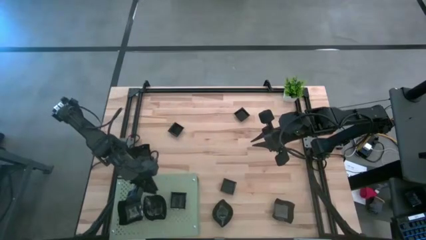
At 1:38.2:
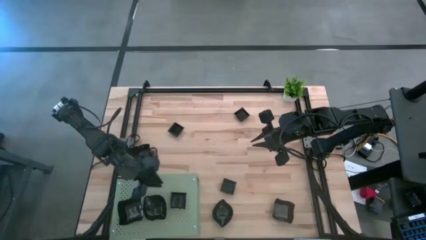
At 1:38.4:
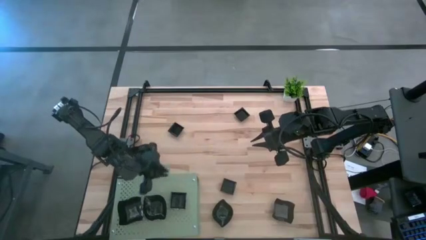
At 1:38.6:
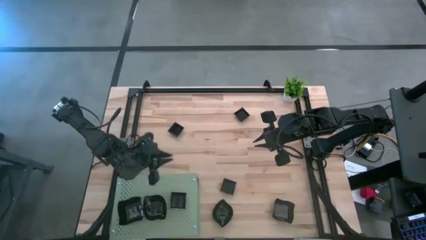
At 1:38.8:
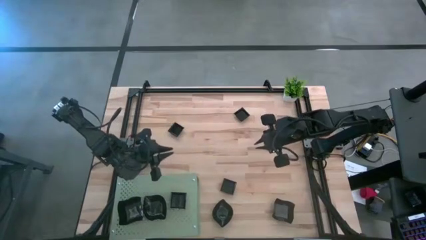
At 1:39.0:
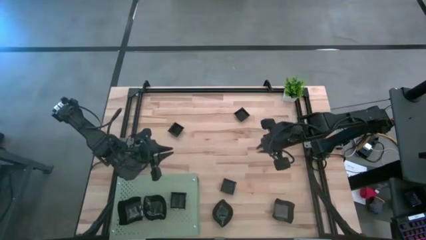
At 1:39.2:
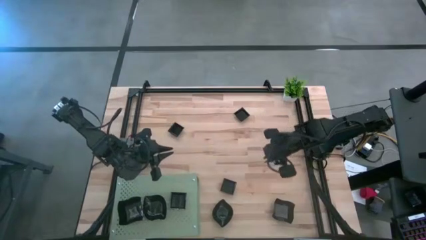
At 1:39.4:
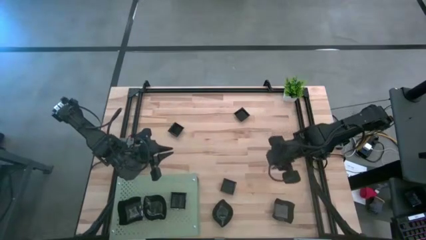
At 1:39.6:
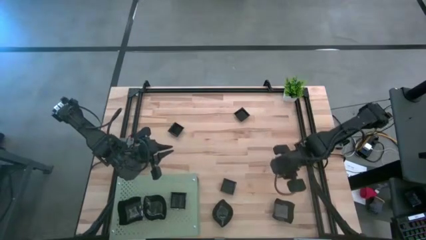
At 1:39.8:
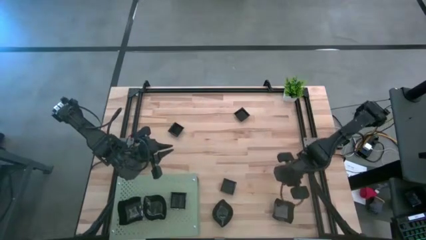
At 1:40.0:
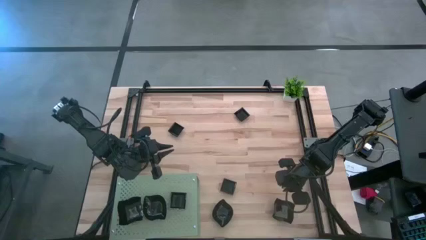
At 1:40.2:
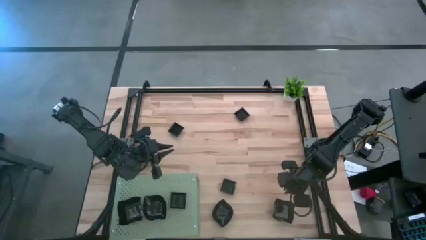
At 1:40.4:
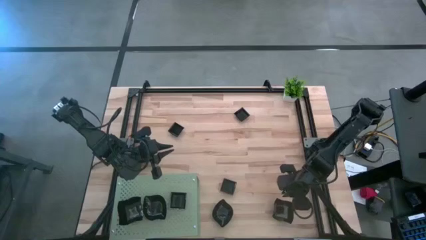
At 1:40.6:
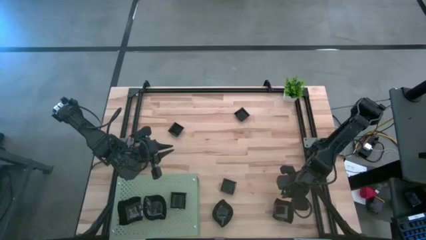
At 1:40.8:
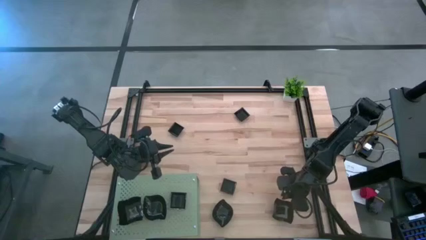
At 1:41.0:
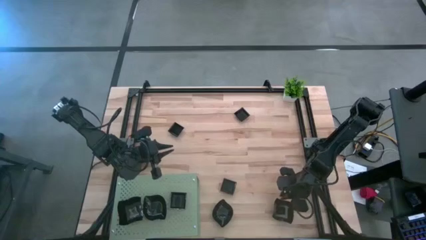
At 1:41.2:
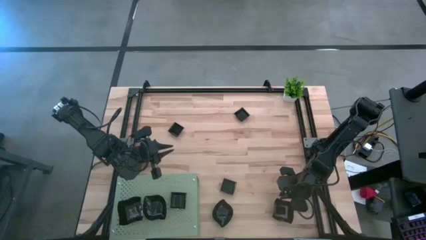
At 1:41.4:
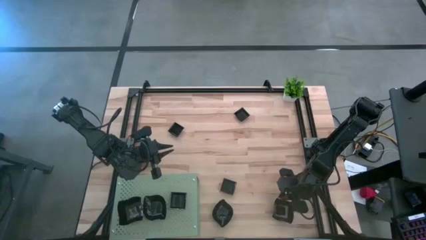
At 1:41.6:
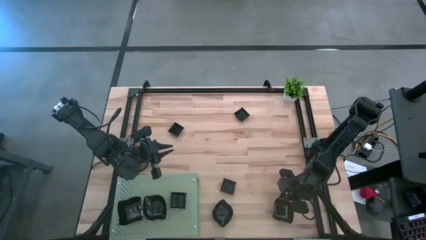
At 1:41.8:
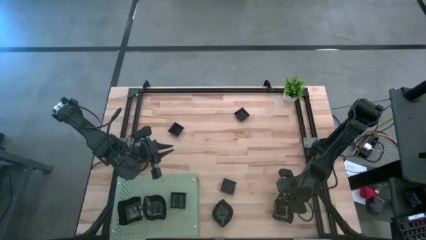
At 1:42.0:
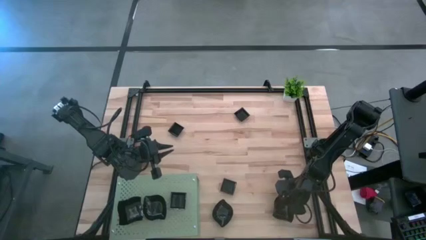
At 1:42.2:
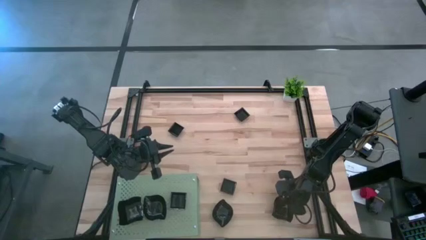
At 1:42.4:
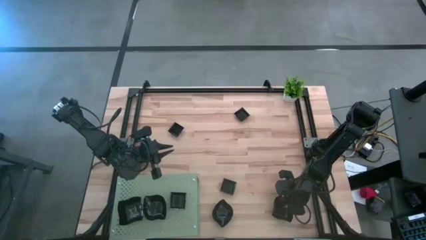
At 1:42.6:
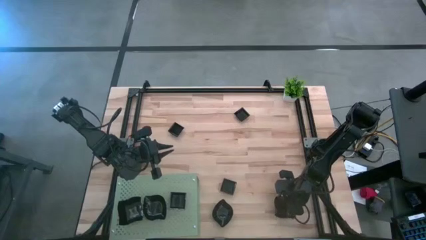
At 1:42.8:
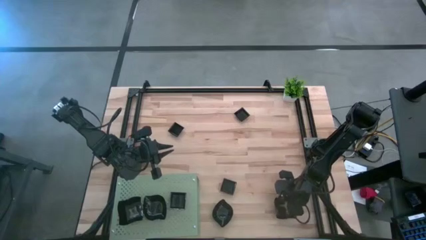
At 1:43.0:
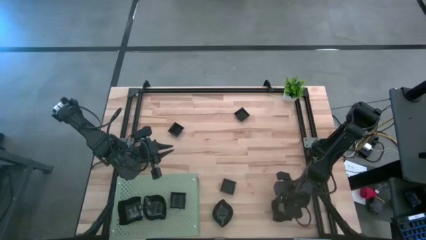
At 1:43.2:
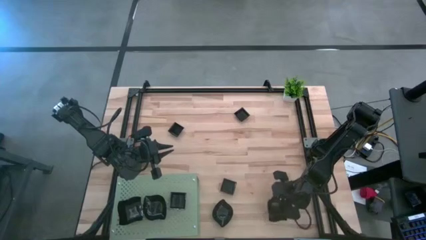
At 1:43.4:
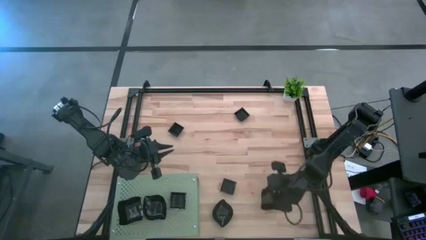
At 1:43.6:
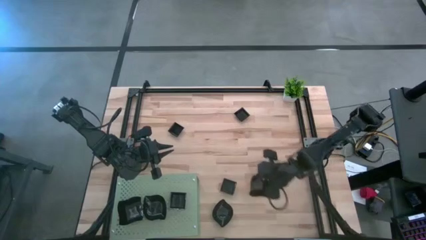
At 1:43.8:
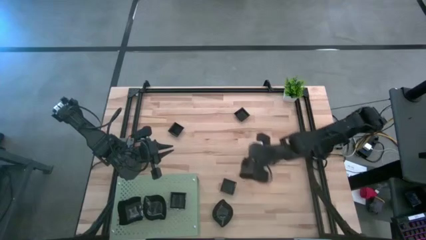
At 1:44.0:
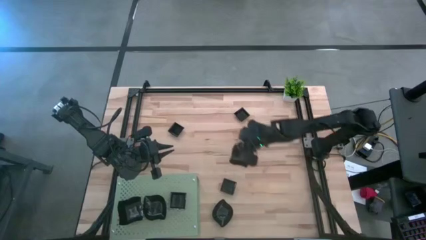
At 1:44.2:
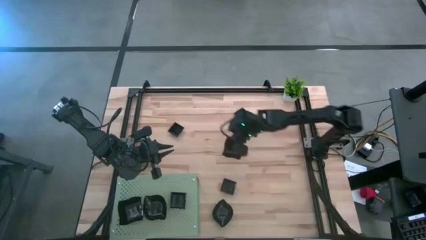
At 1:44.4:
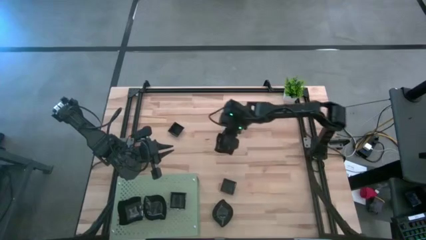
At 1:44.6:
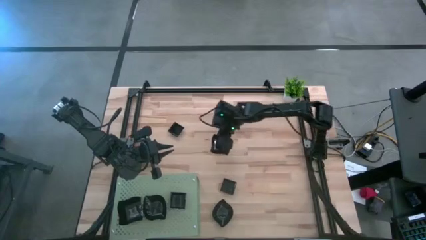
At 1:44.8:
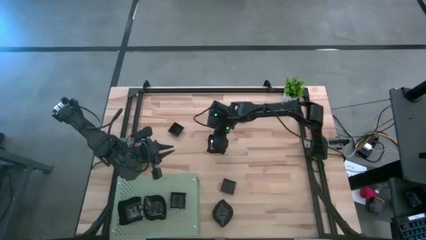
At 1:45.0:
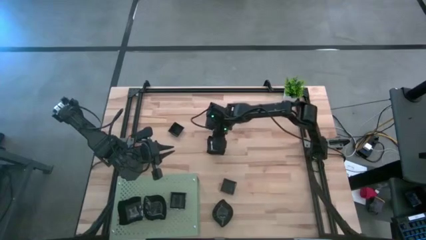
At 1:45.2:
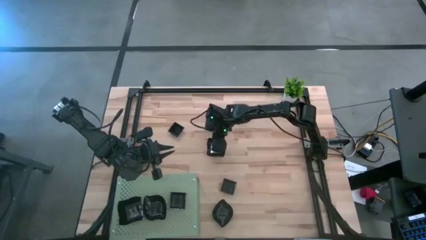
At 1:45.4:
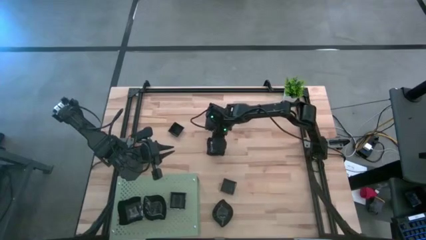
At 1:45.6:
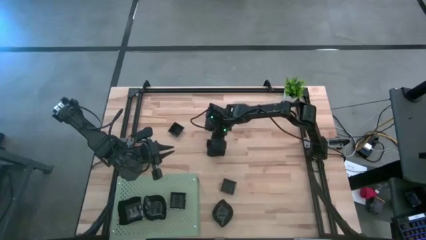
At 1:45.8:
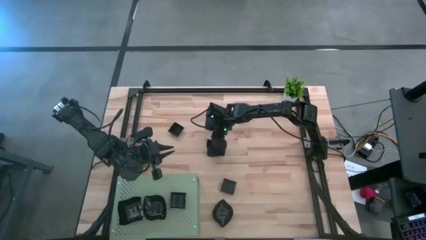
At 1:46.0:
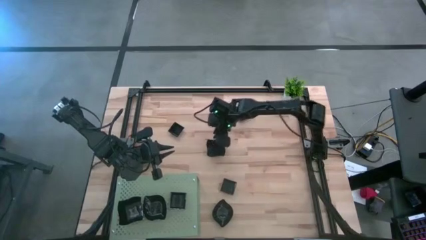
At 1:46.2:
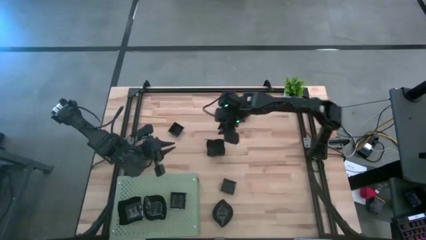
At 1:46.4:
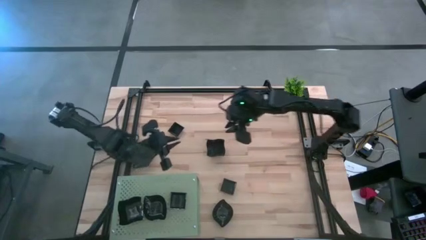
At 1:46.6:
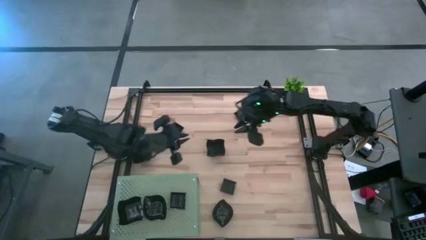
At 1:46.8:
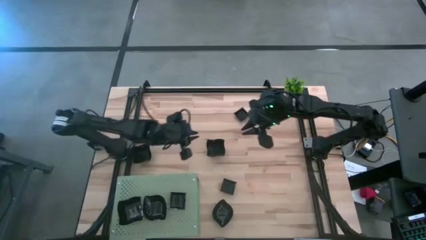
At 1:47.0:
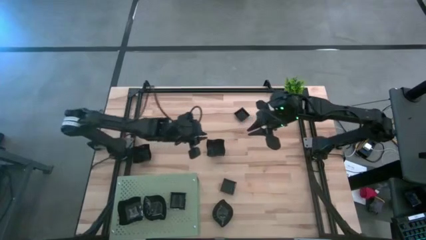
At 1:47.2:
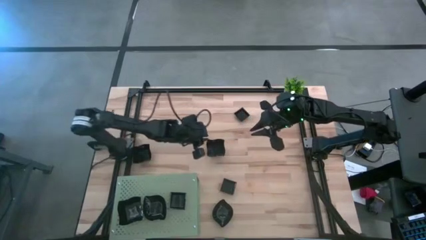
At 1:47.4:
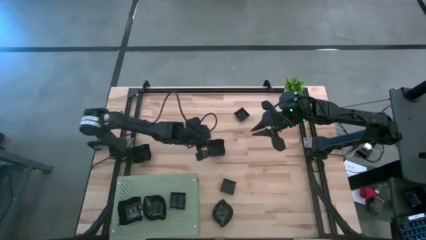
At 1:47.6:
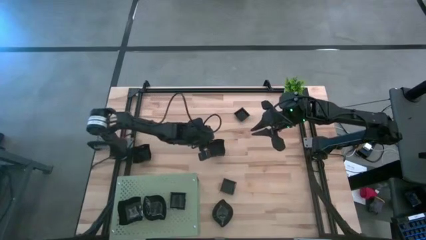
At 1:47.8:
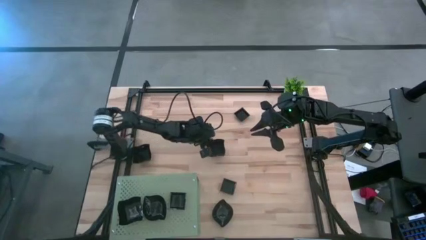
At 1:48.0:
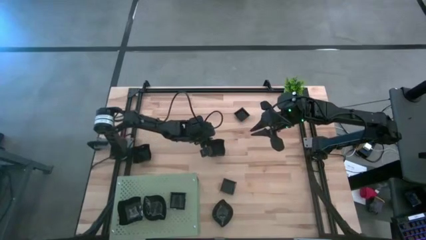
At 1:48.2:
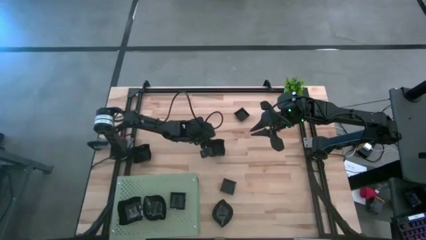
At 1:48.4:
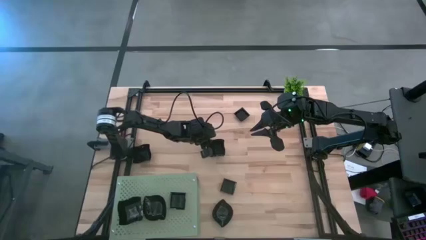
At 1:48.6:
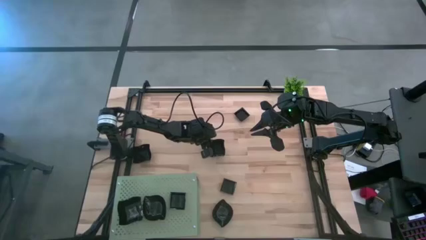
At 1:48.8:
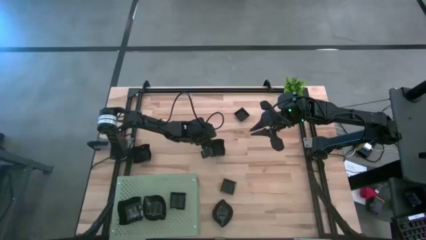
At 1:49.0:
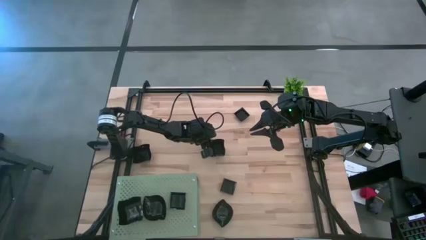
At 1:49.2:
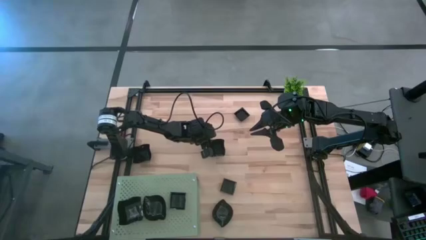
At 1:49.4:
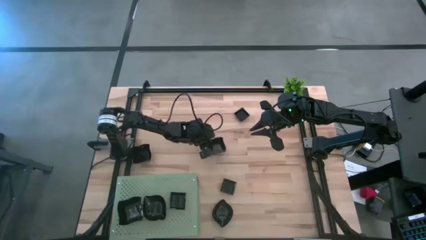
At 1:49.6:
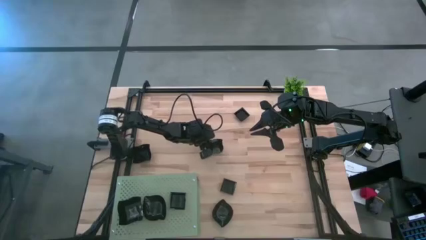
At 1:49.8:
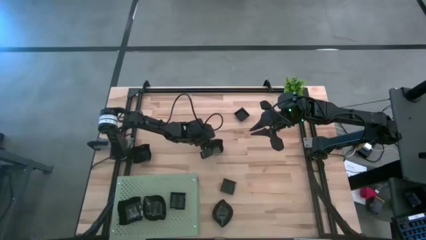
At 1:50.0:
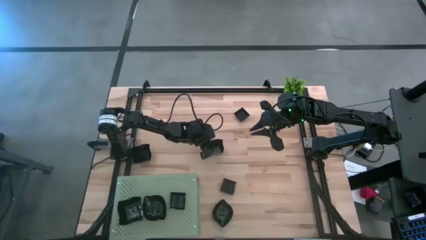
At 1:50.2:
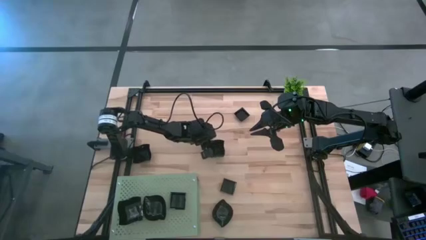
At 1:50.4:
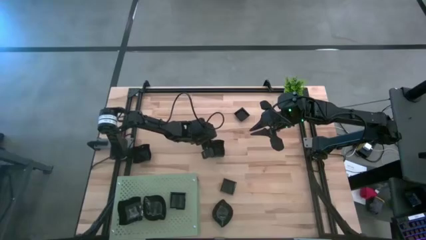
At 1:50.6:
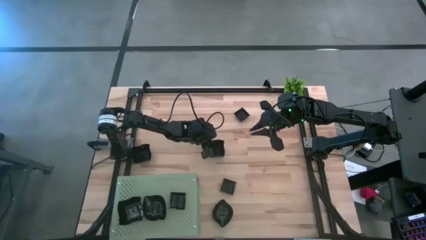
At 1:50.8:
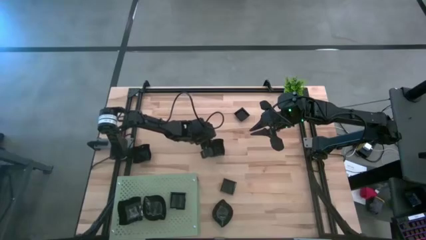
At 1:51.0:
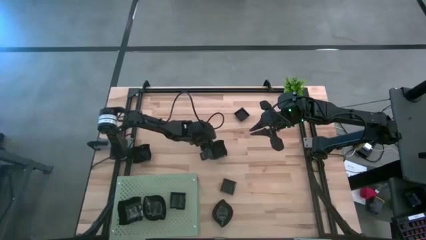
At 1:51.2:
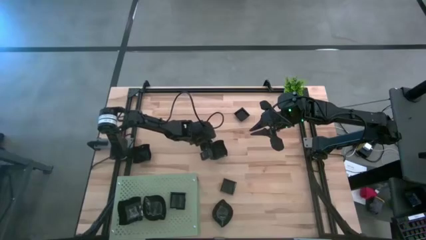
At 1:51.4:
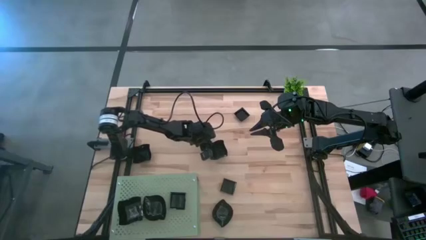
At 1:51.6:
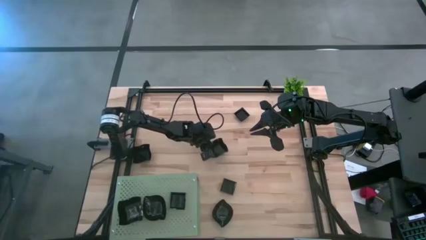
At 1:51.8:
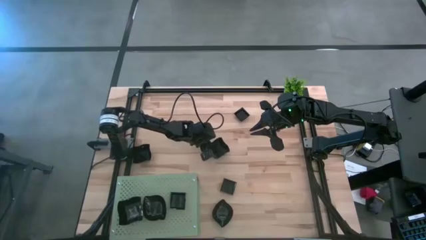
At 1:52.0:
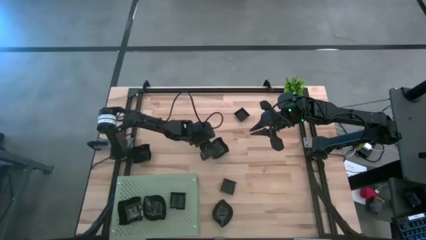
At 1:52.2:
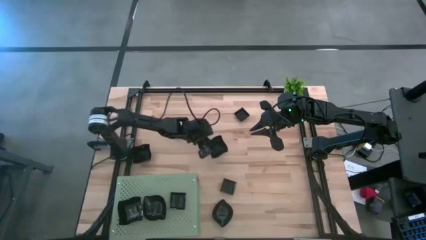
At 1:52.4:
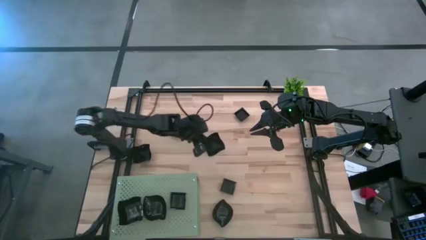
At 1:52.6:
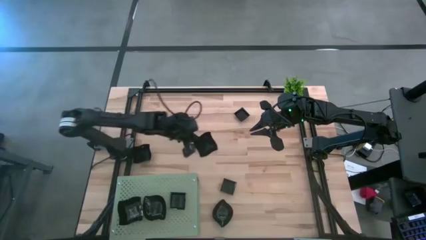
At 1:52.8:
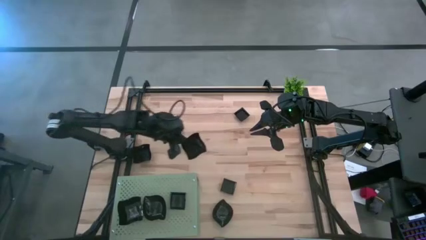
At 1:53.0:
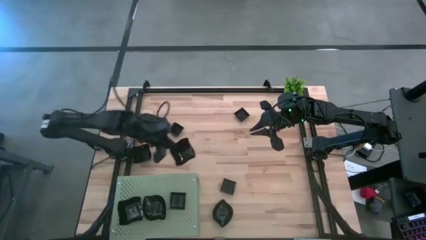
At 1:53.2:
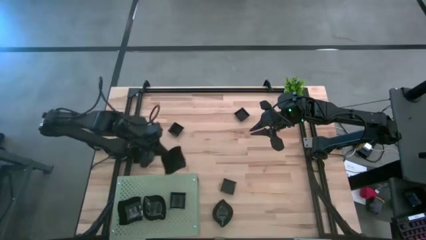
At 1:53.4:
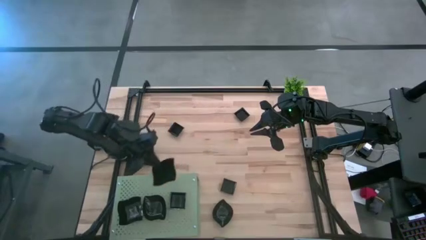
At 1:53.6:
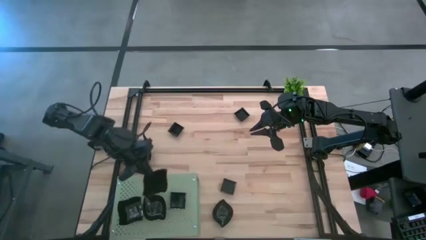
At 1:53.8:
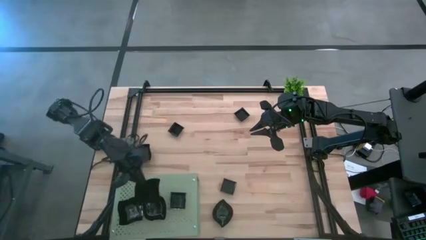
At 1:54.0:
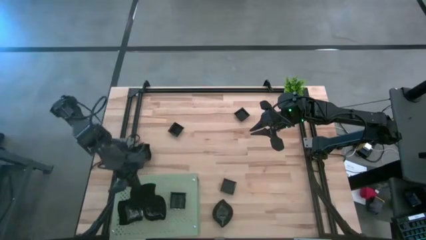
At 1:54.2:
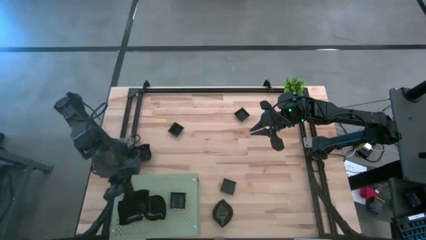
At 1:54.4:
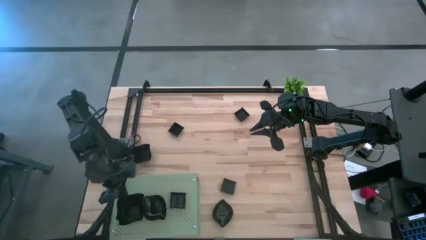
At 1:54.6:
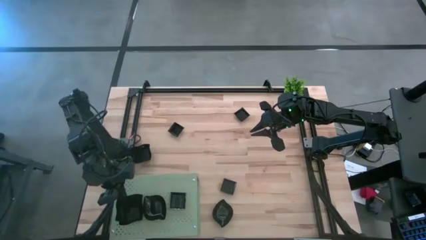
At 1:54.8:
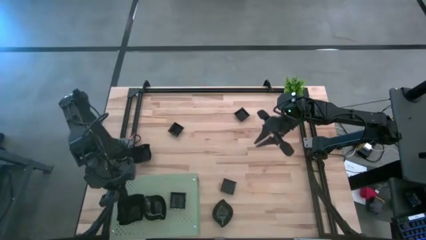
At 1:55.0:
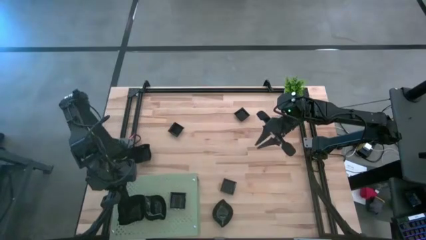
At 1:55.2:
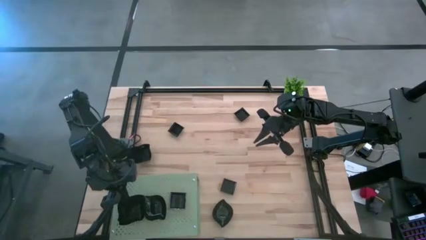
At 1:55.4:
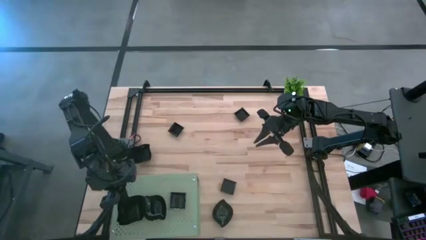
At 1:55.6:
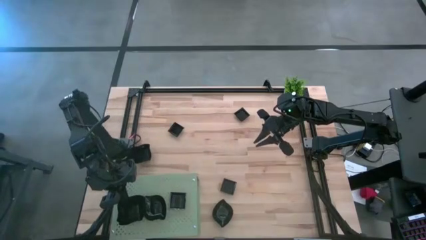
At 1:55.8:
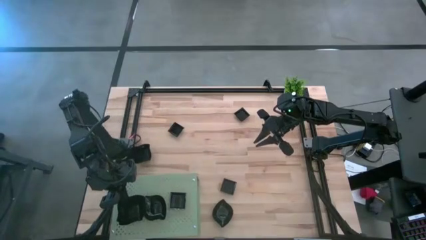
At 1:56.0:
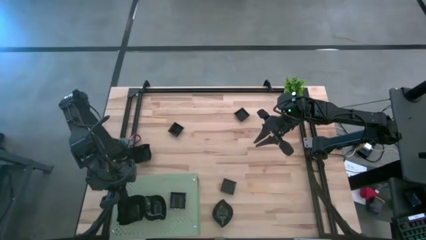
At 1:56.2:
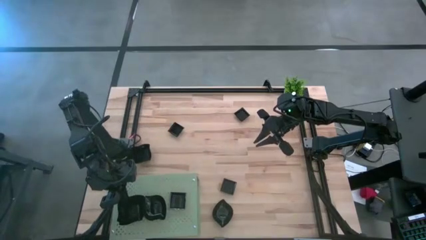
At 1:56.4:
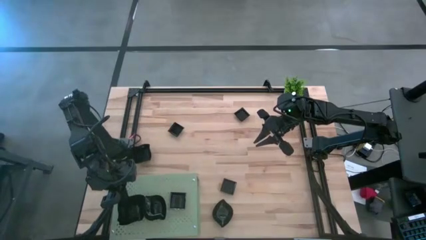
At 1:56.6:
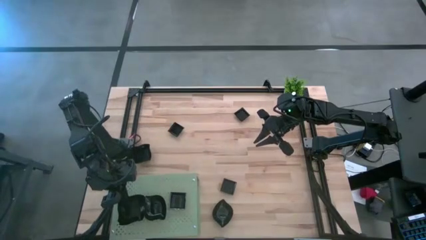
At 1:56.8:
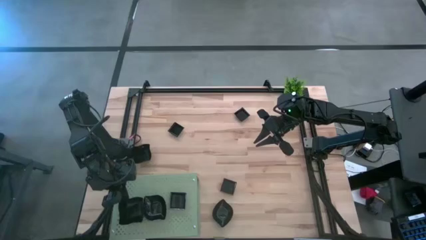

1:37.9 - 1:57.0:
Task: Pick & Place Mini shaped plates
Stack the black distorted square plate on top of the other black distorted square plate on the shelf
